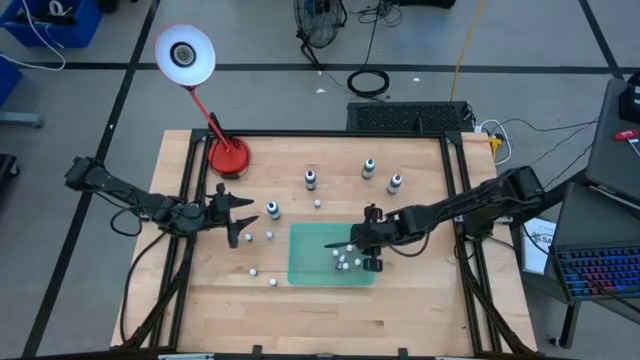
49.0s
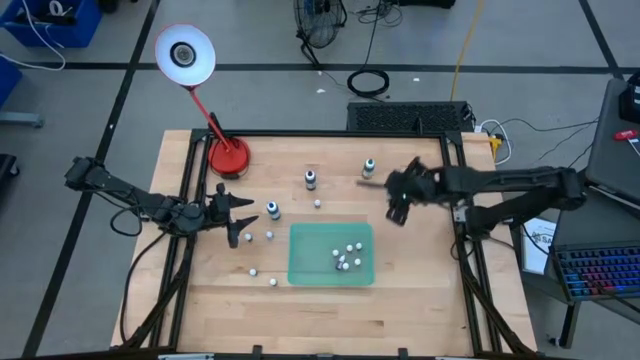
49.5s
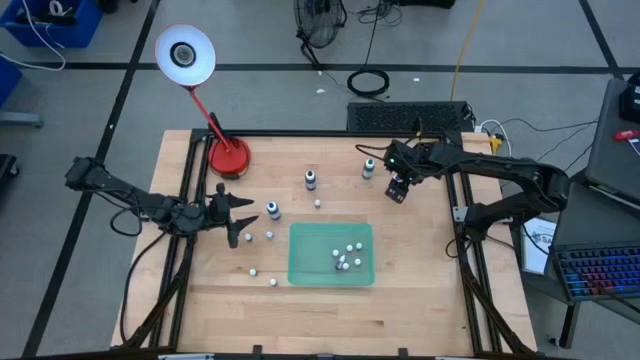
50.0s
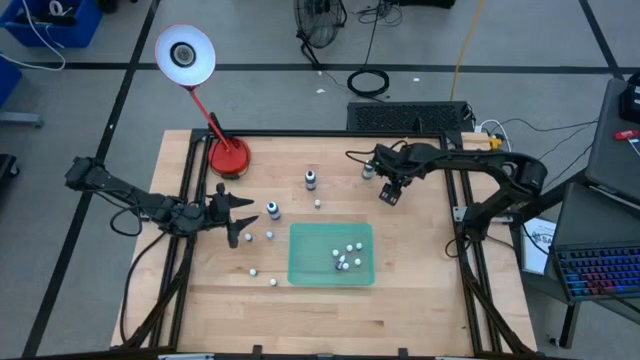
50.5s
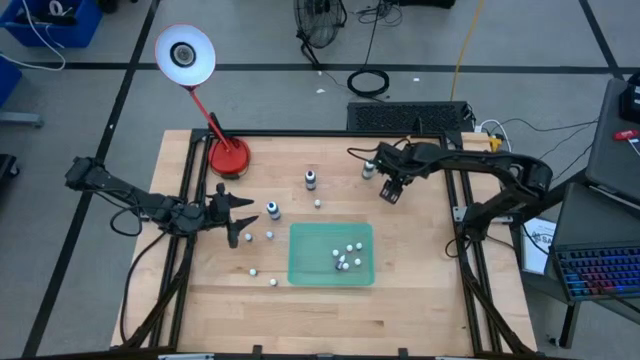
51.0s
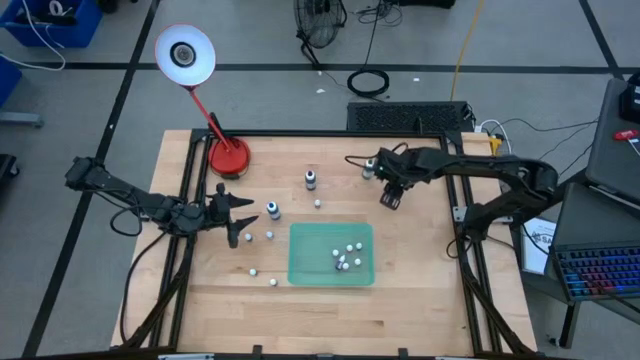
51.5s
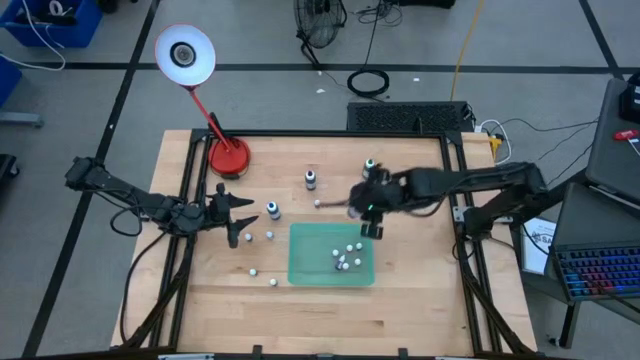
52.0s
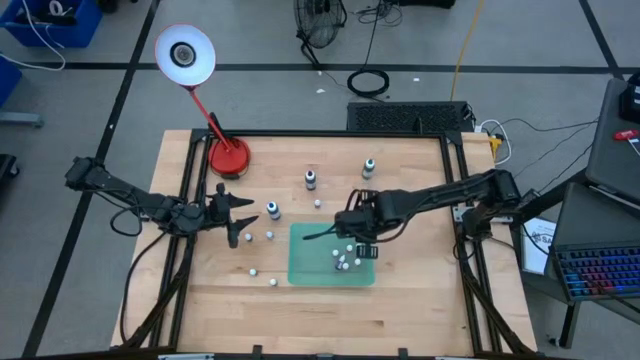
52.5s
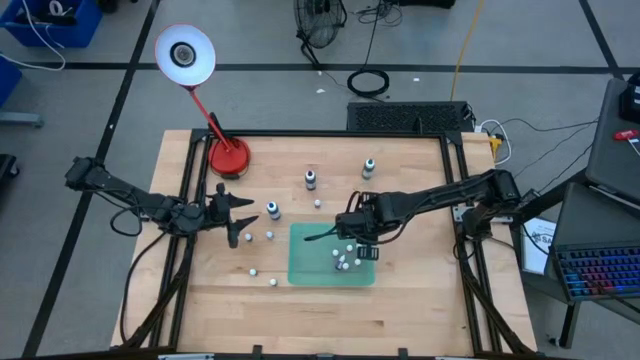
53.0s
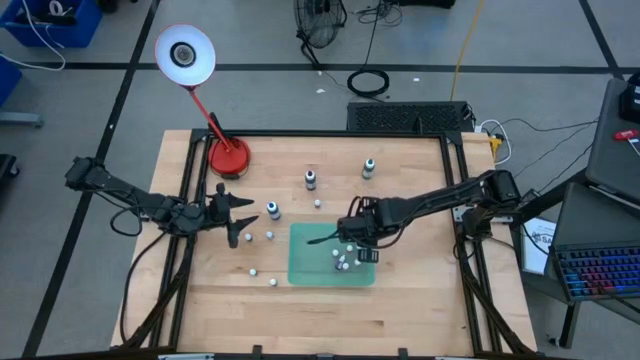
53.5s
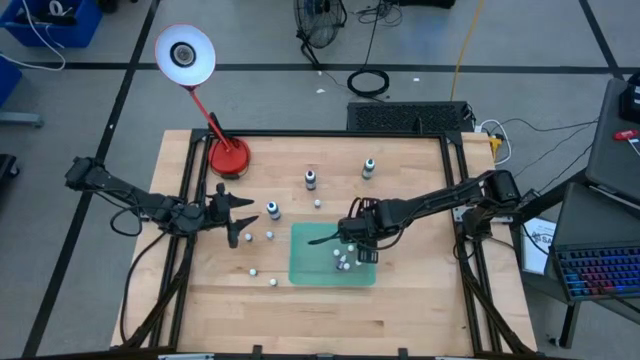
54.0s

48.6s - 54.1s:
Task: Pick & Place food coloring
Put the big violet food coloring bottle into the green bin

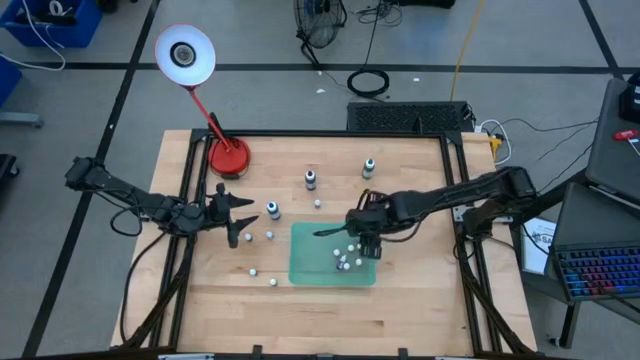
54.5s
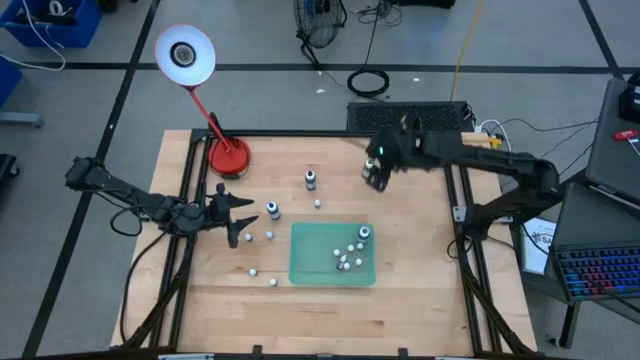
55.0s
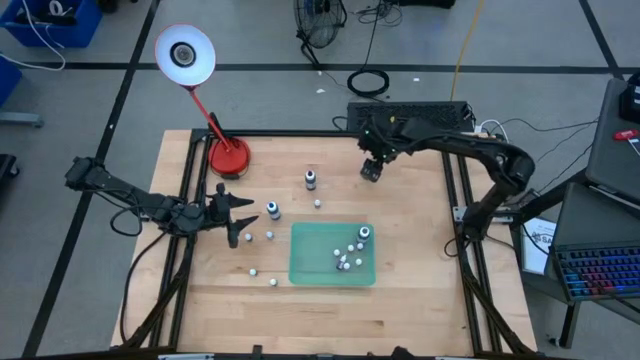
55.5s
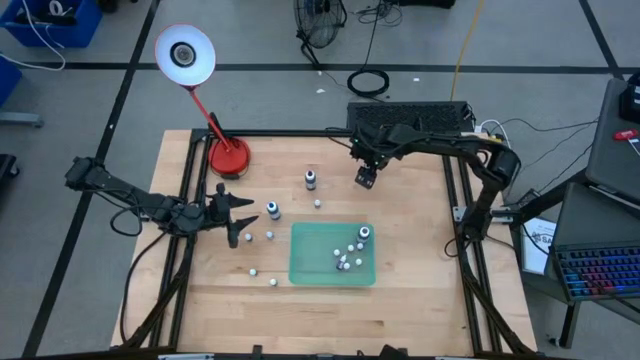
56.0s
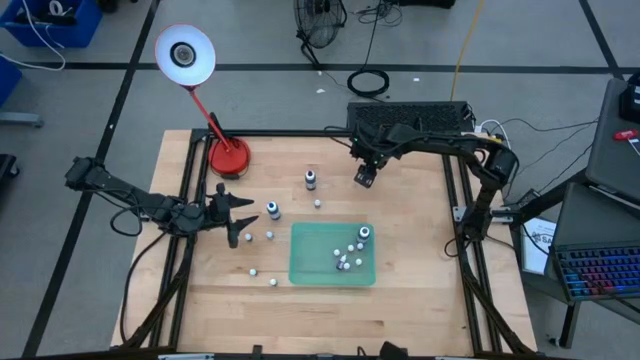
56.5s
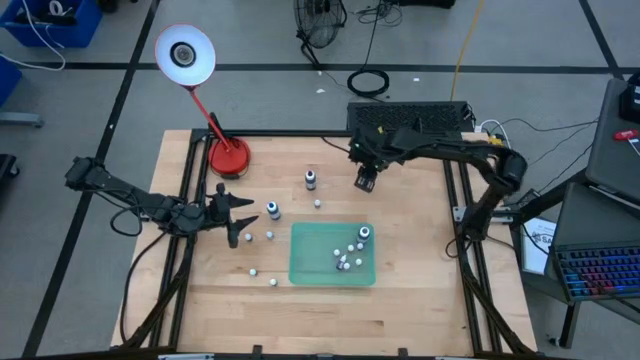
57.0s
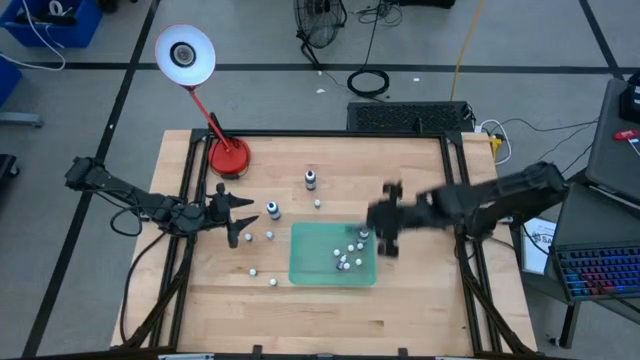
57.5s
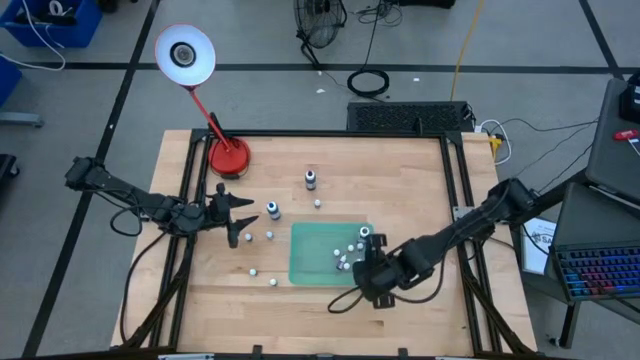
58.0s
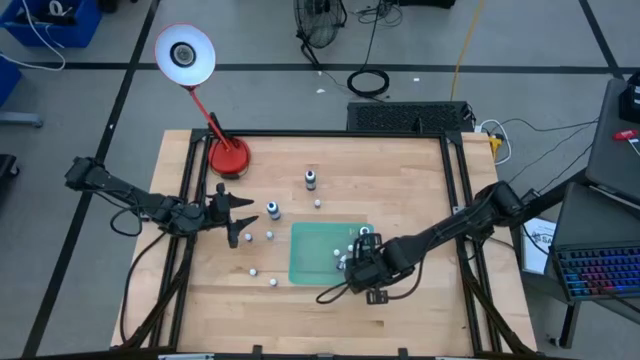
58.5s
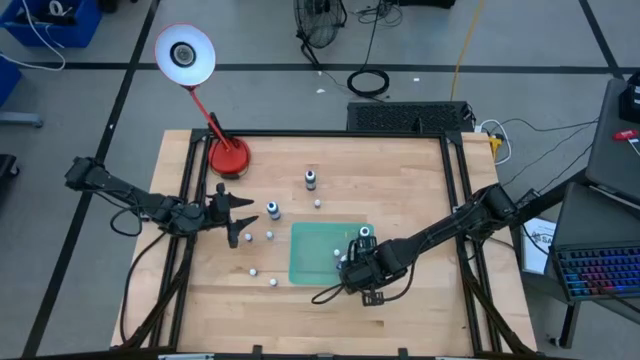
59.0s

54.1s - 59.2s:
Put the big green food coloring bottle into the green bin

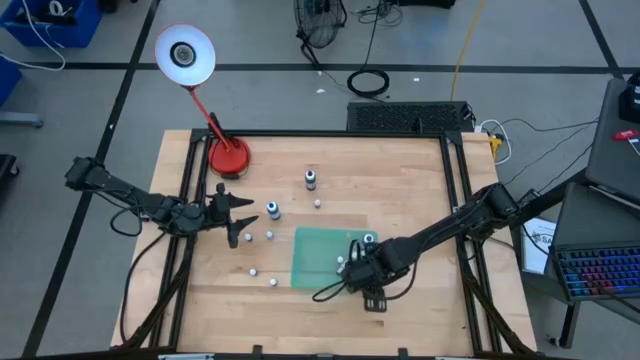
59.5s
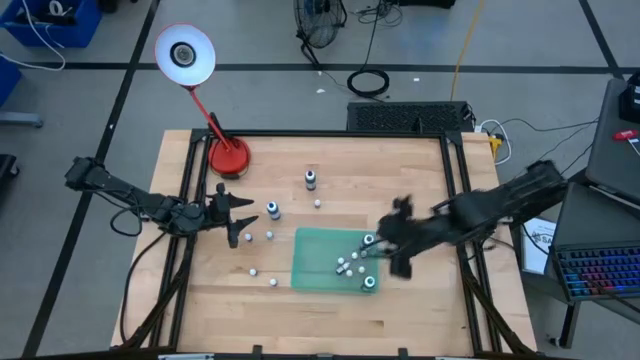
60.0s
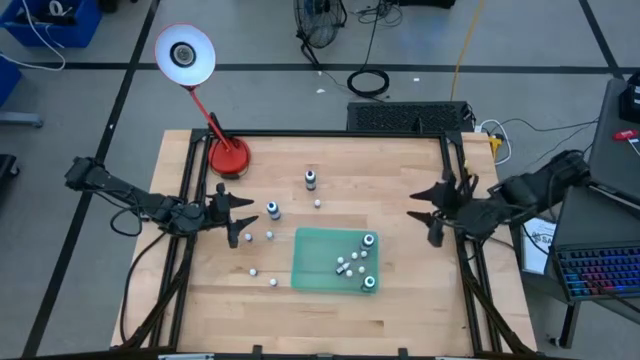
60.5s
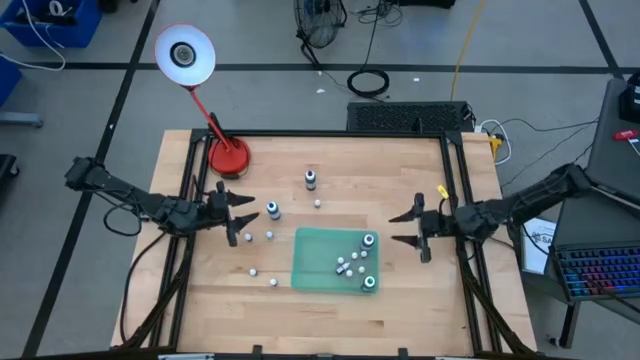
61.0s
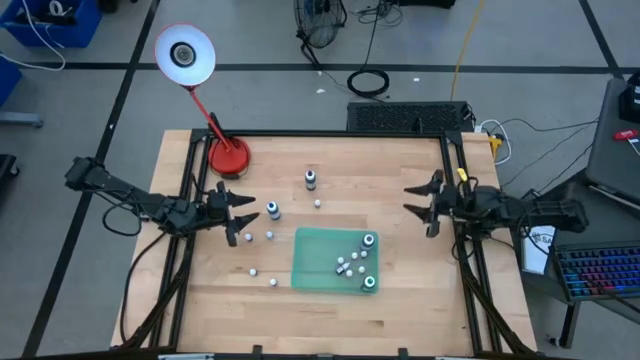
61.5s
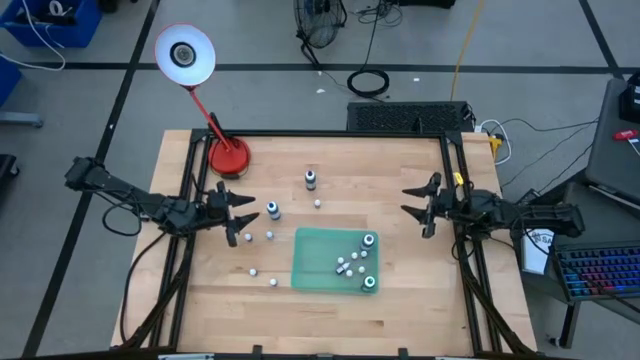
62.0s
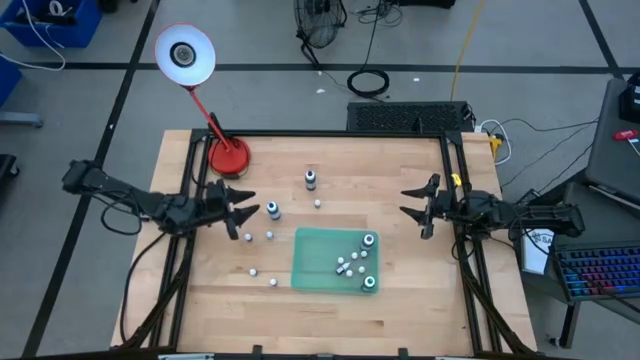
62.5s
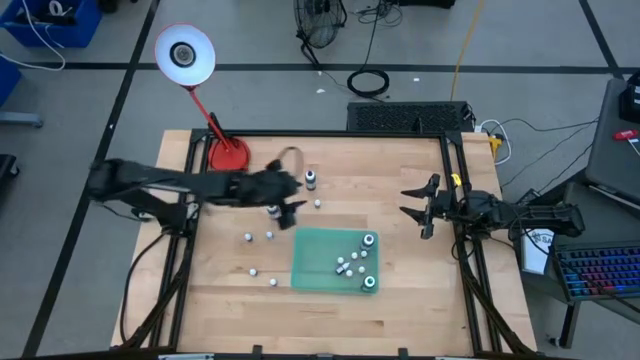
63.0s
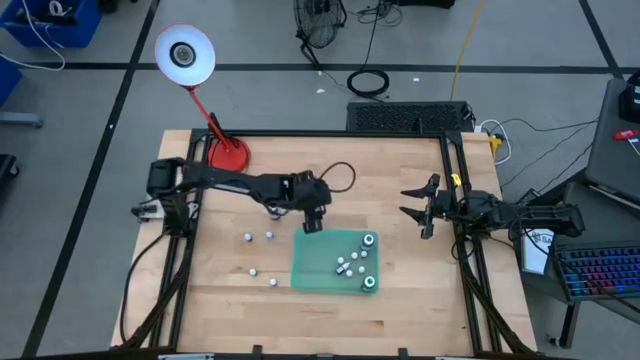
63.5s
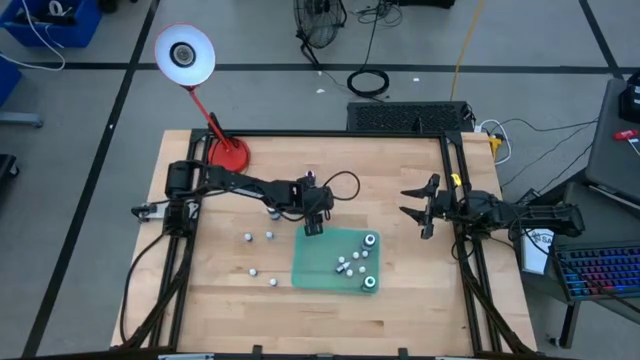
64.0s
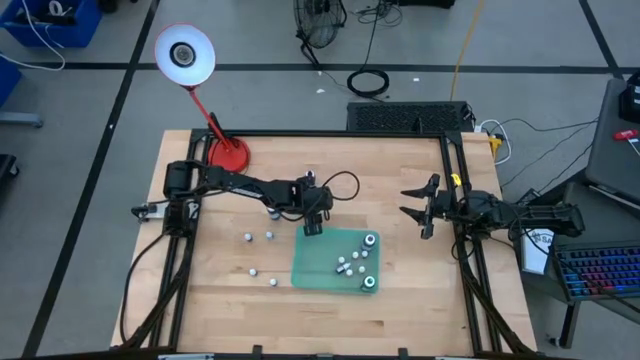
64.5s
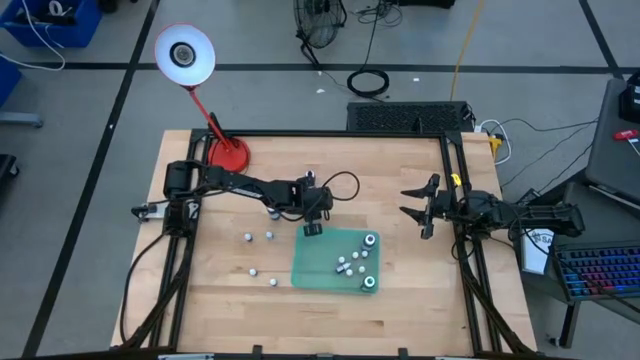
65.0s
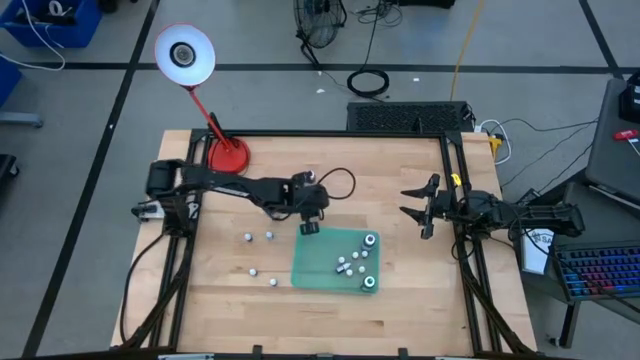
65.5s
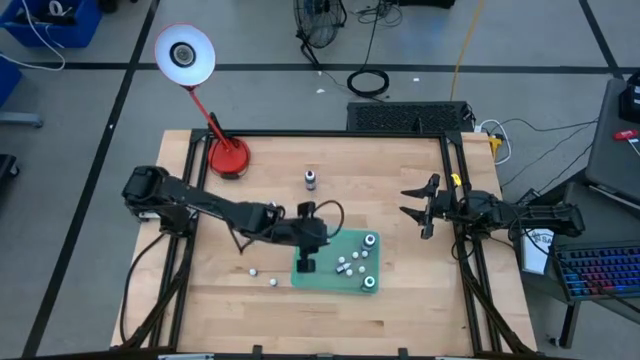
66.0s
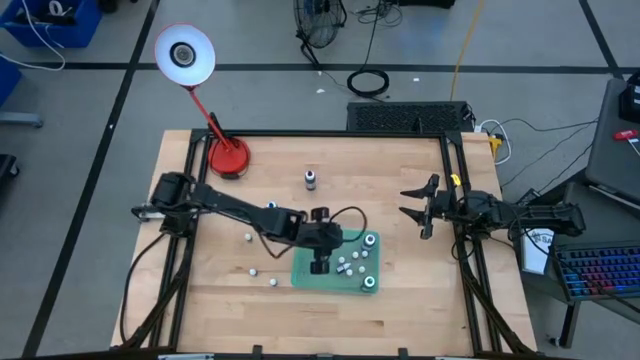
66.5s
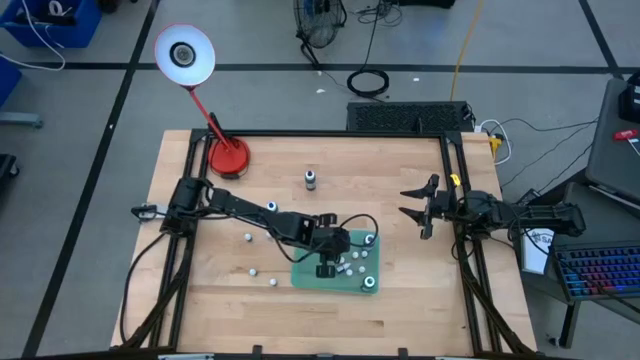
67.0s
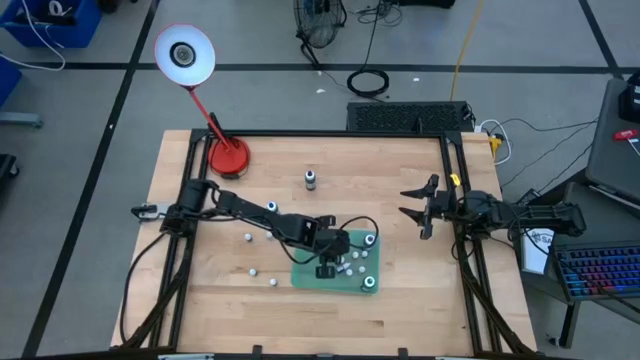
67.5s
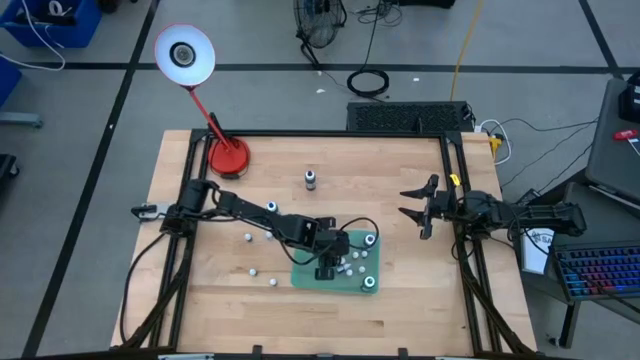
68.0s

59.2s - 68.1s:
Put the small red food coloring bottle into the green bin

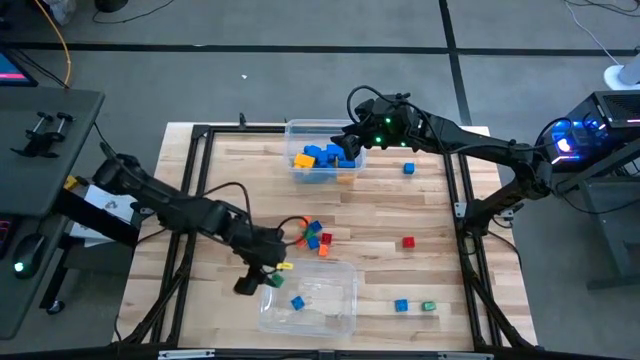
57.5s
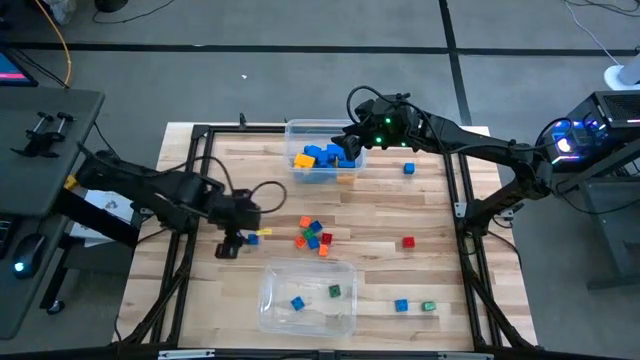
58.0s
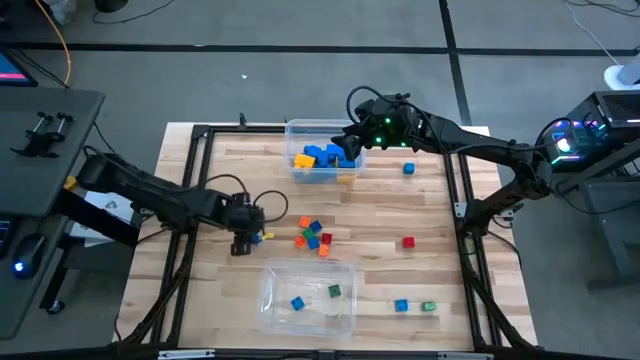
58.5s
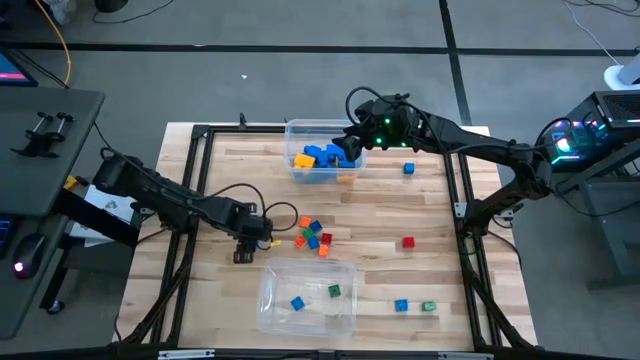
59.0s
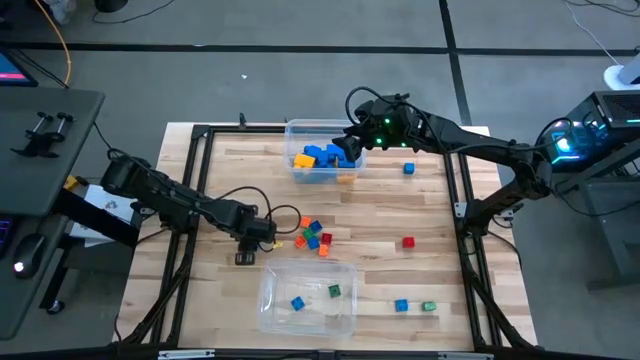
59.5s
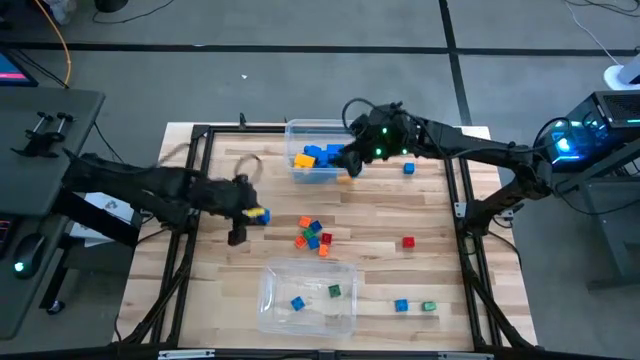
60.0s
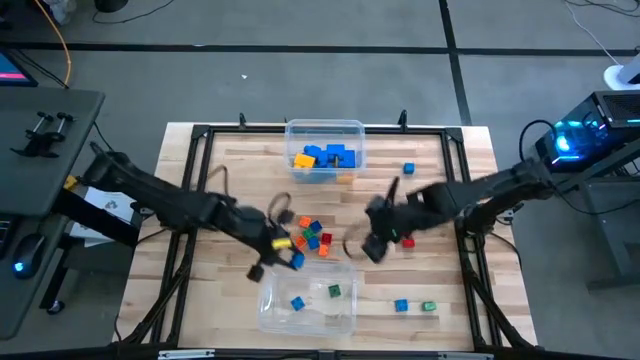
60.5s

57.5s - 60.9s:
Task: Sort blocks by size
Put the small blue game piece into the bottom transparent bin
